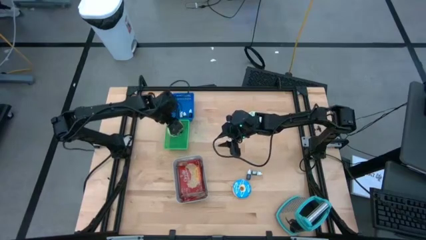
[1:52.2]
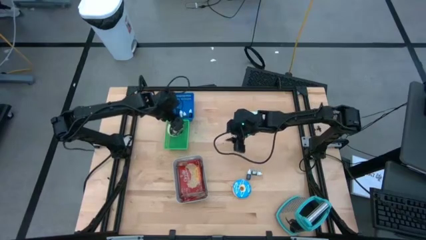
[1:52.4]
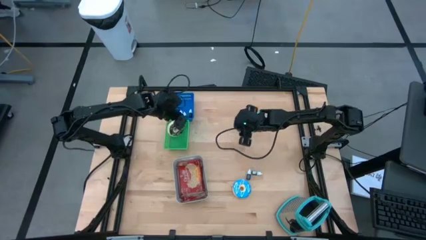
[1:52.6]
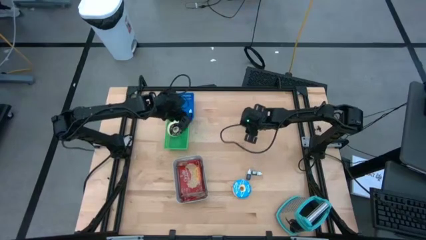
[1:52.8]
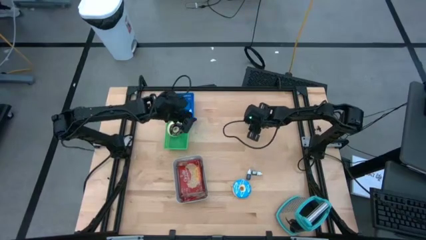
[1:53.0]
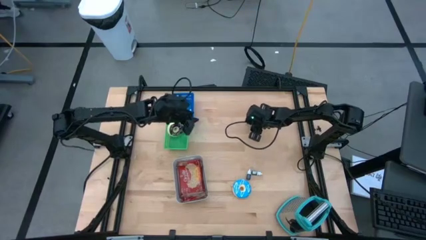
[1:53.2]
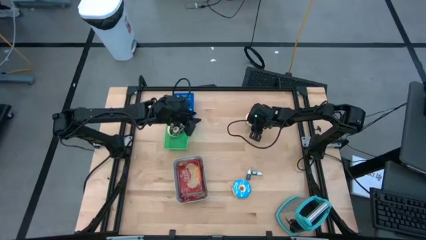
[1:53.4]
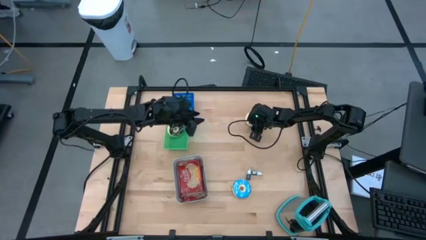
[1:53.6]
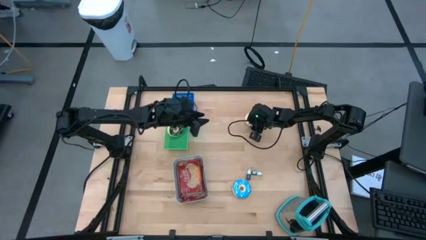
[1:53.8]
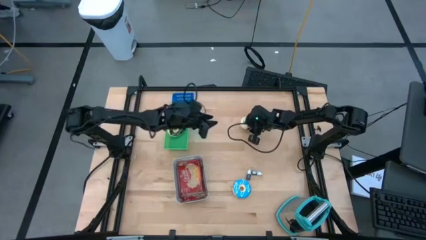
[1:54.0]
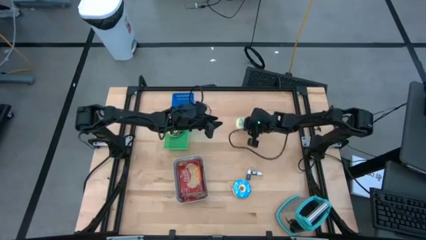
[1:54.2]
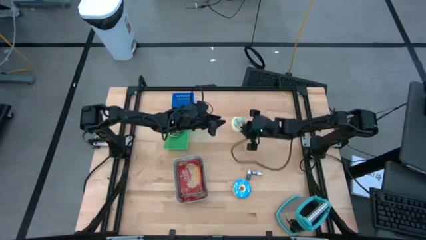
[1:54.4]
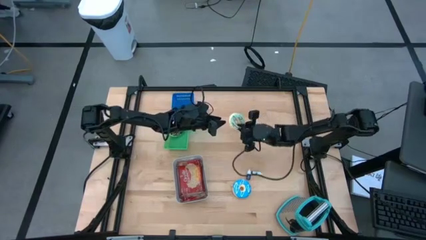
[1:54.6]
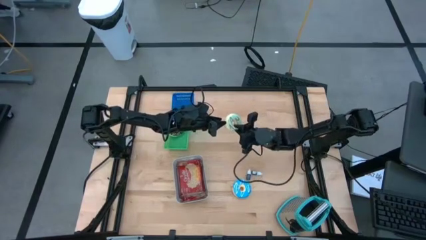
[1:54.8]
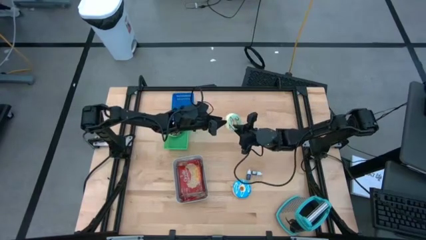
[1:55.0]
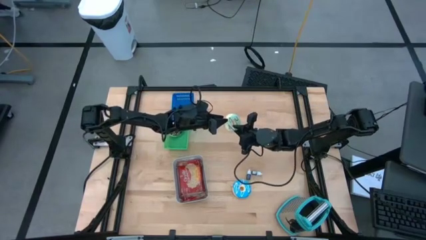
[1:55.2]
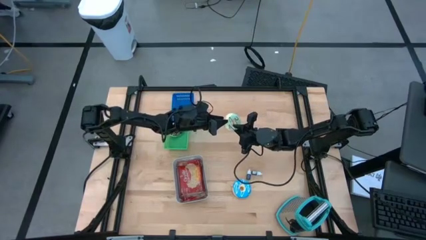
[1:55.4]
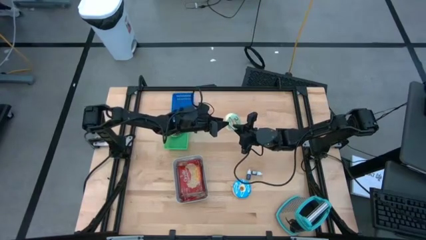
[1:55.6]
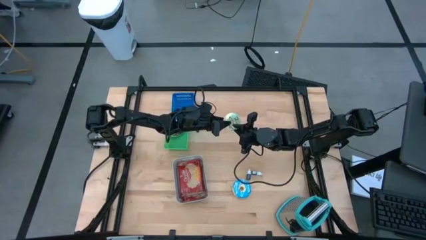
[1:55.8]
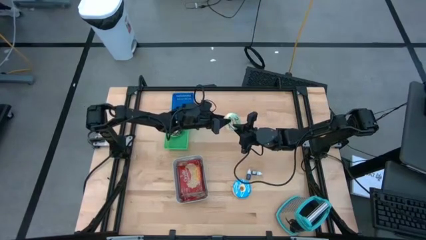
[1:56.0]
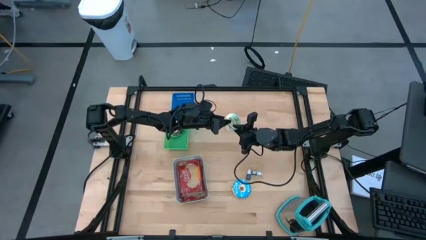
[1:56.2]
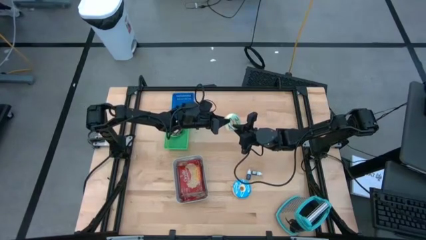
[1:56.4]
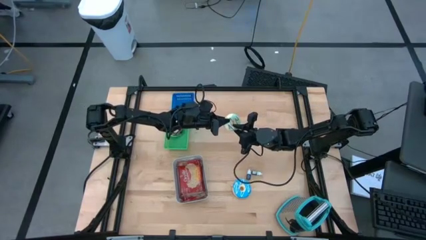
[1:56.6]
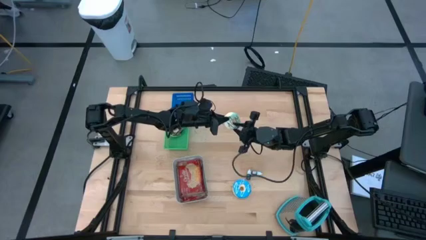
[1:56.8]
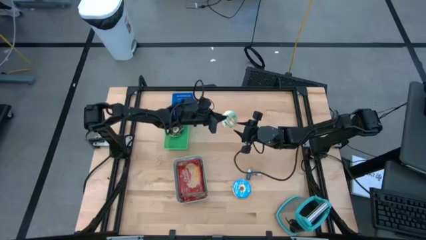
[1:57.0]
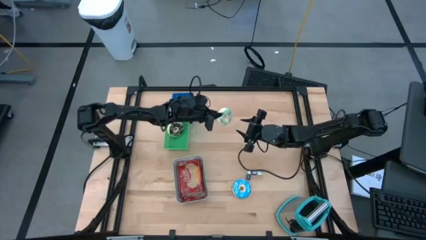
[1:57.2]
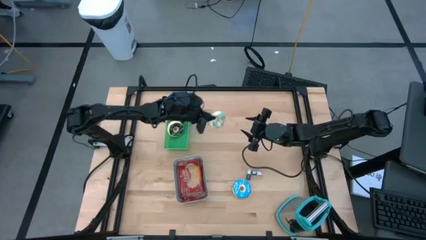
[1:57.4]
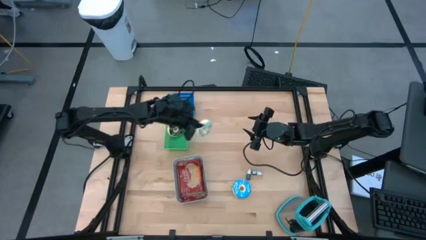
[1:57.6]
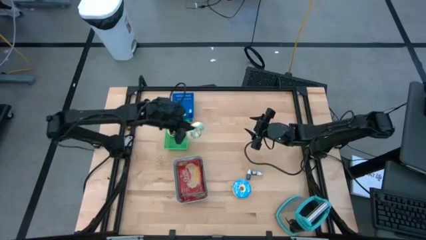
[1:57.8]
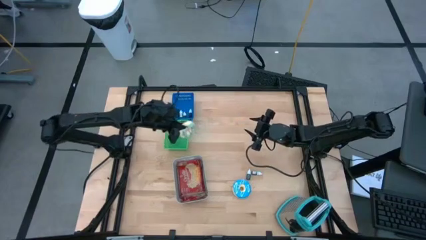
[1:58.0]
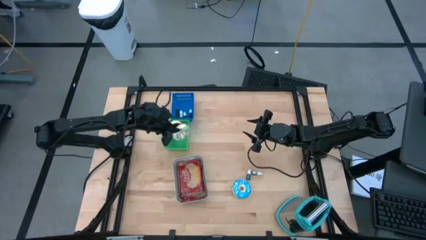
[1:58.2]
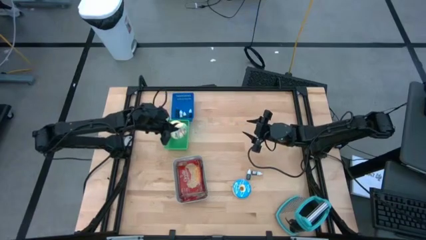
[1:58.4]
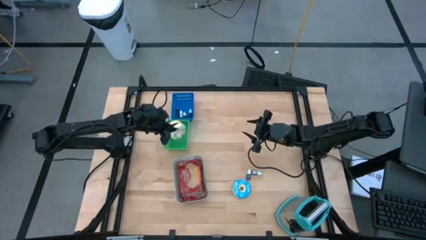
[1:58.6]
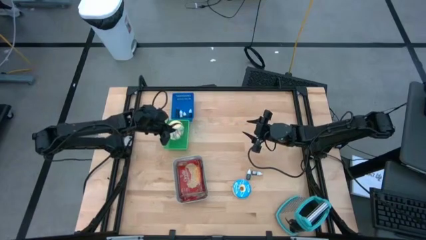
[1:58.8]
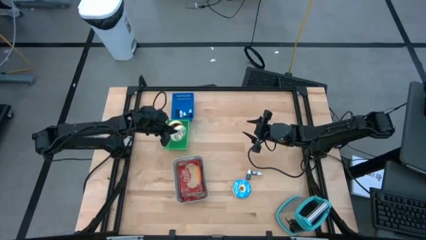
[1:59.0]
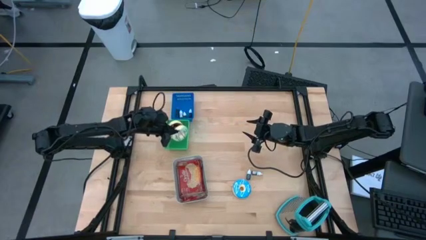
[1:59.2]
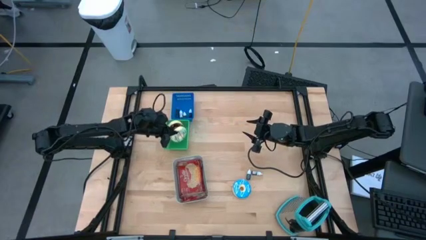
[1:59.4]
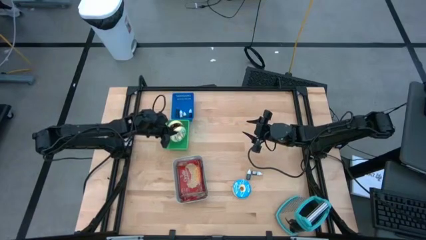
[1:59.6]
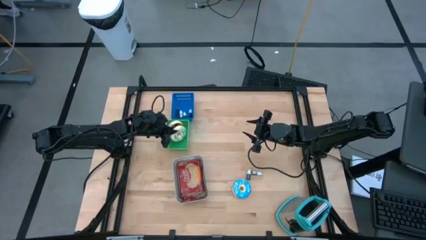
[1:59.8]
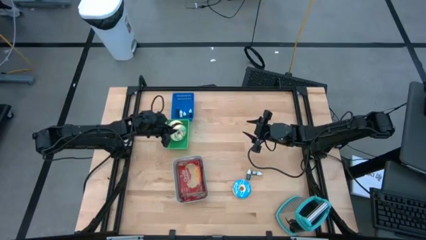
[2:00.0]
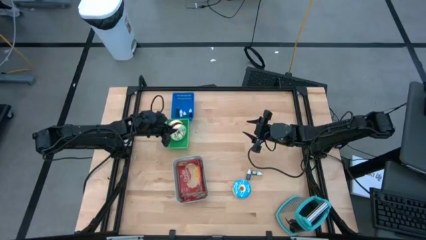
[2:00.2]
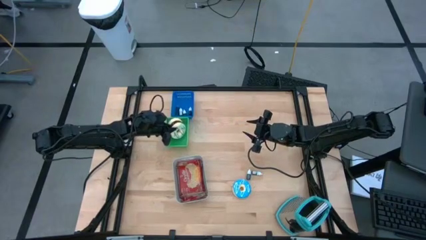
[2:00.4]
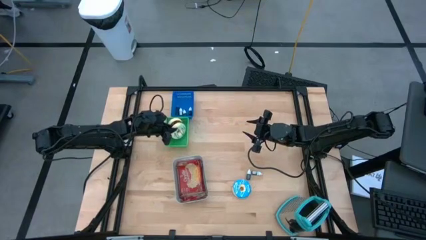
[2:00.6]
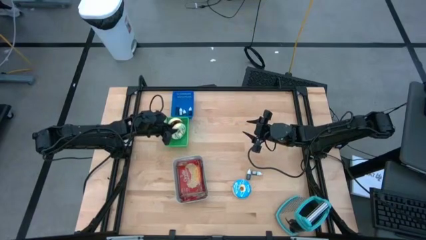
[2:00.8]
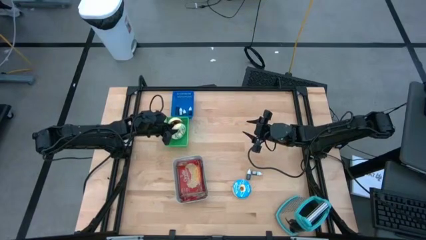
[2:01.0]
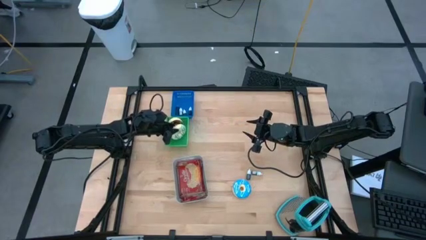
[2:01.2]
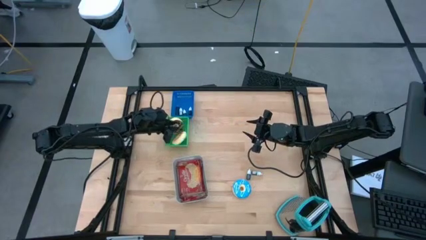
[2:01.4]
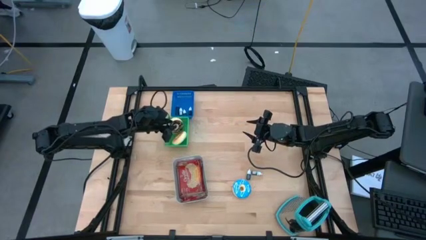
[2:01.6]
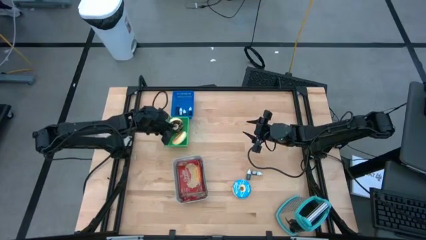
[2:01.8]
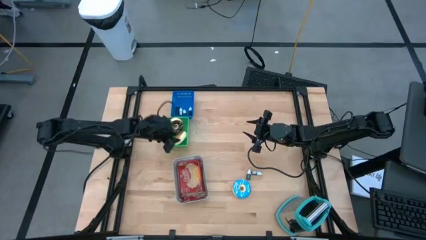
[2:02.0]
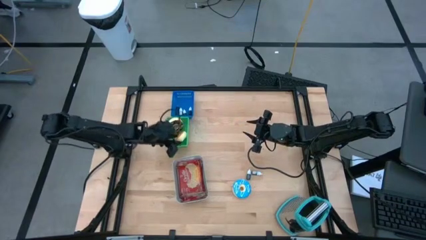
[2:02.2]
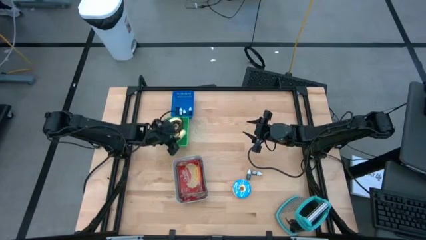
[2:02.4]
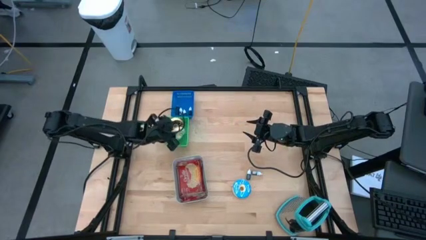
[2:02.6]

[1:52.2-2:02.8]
Task: Pick & Place Food Item
Put the light blue donut into the green bin

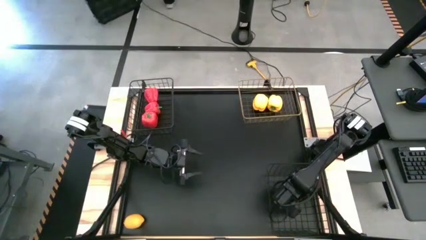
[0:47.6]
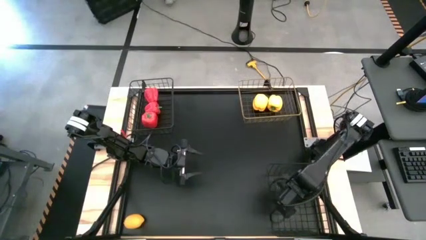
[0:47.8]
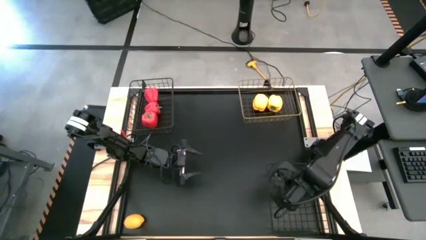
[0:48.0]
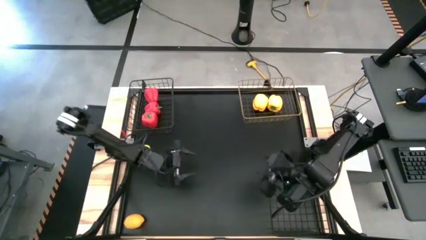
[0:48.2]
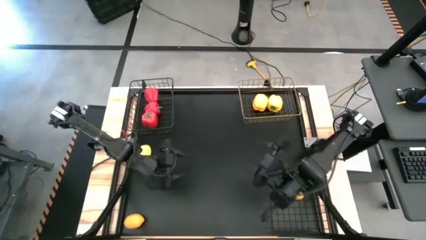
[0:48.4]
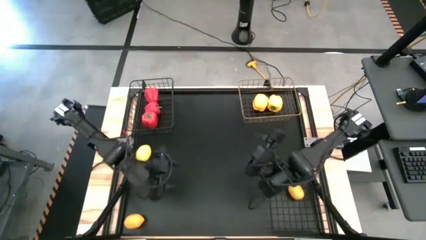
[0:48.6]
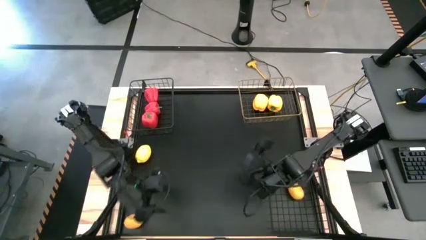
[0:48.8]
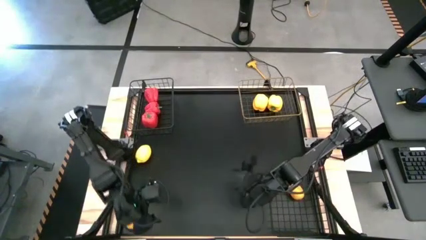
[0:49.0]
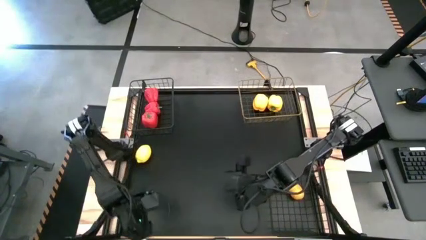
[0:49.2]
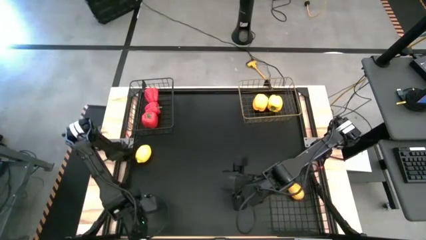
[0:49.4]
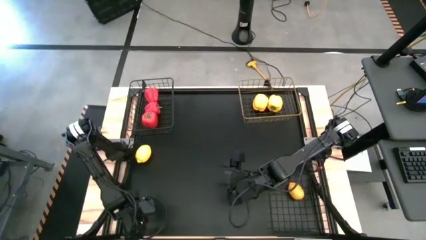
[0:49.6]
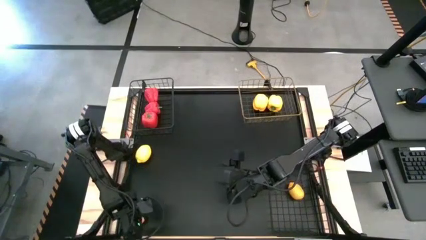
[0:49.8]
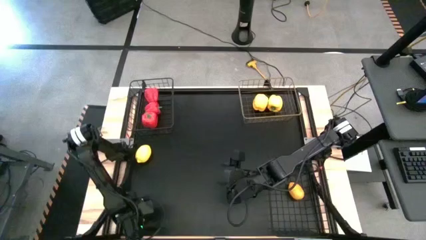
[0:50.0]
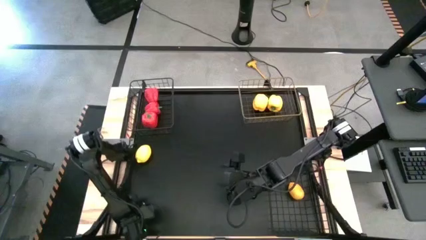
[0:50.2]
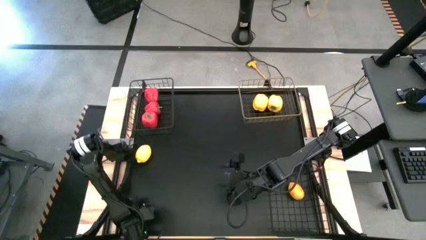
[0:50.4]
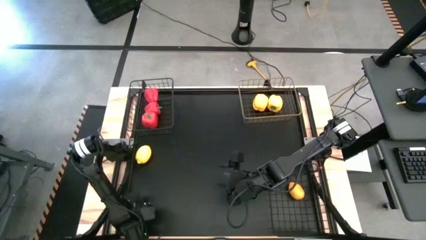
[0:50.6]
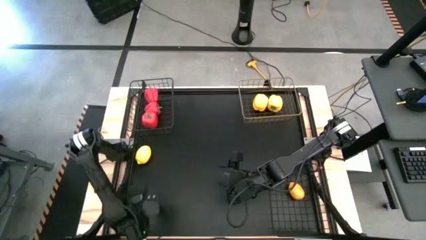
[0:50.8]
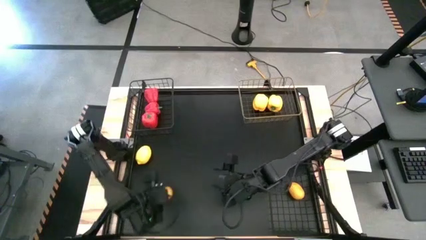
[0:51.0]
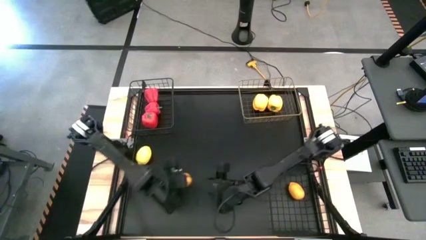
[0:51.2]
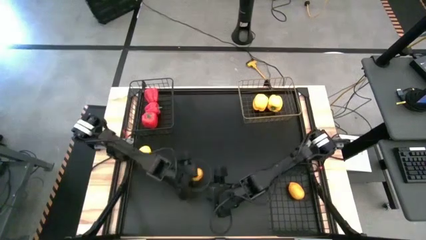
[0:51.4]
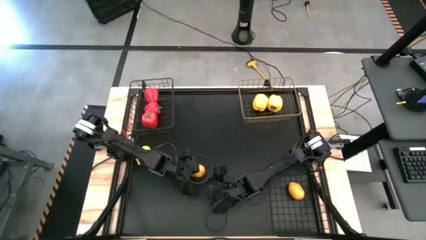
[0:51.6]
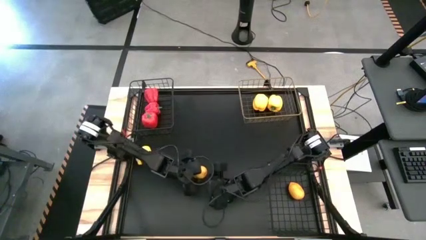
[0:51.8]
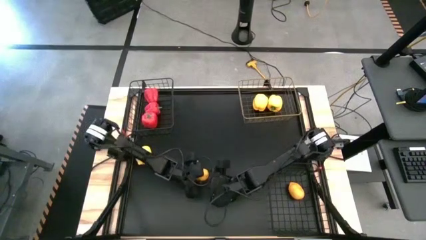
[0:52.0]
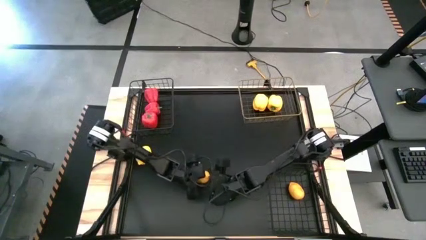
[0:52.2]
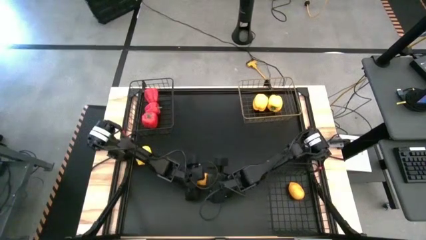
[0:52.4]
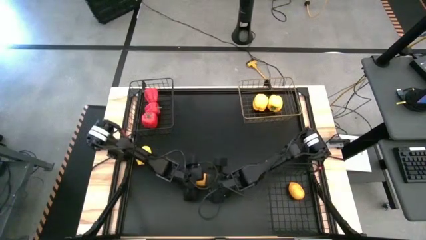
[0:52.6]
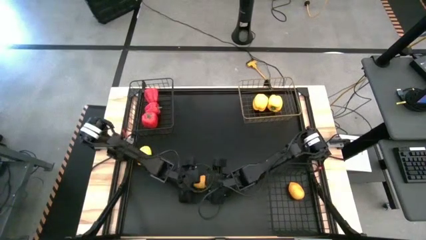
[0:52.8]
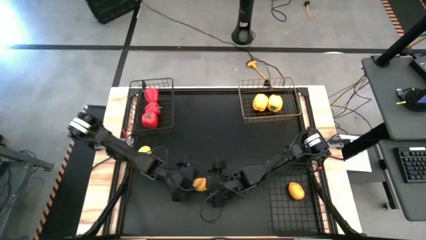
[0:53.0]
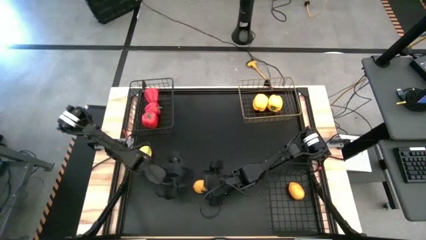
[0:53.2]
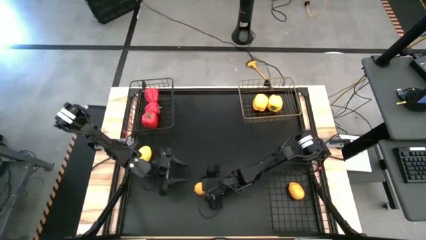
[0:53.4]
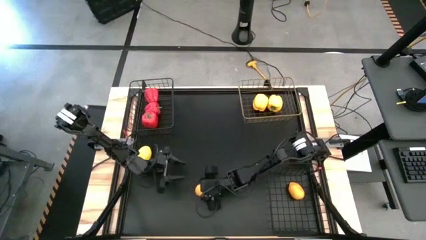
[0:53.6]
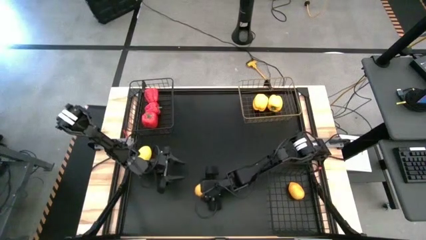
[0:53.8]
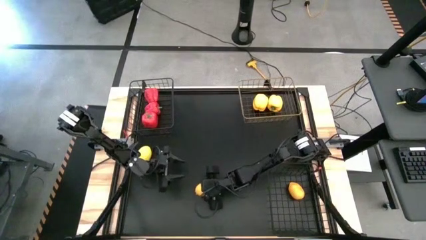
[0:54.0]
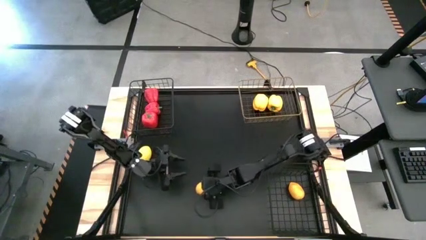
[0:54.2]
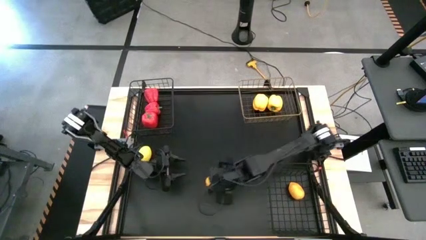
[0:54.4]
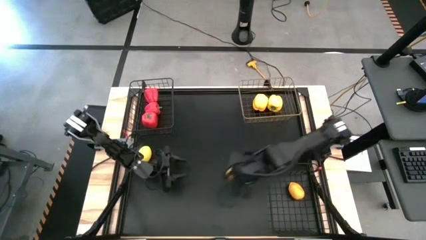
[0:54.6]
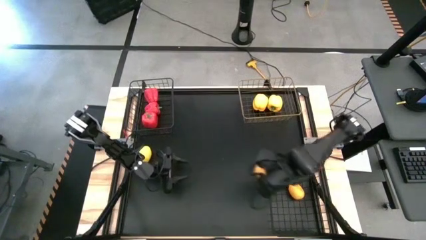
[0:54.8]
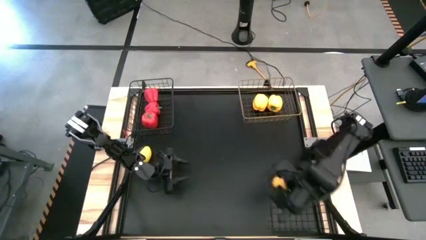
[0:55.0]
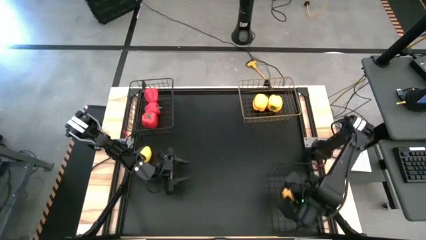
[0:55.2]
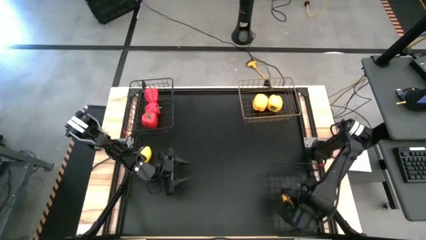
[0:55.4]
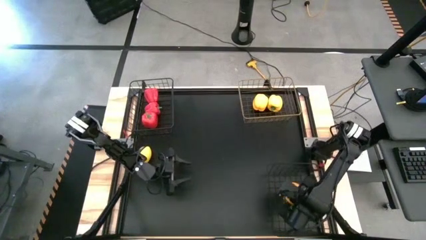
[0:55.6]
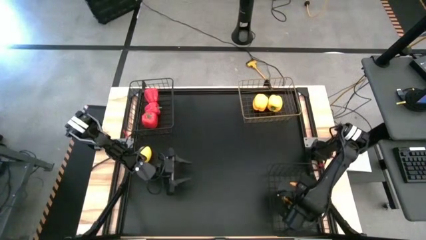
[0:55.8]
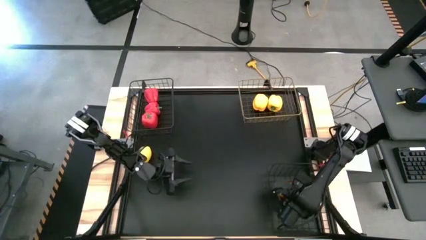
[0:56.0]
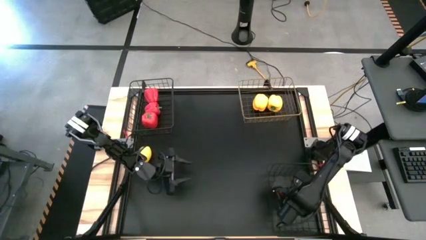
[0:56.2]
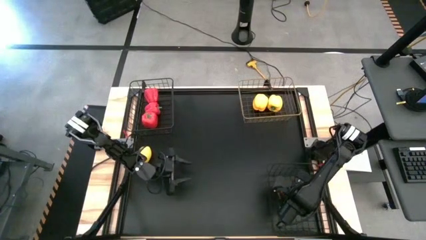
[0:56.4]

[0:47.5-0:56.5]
Task: Sort produce into baskets
Put the bottom yellow lemon into the bottom black mesh basket
